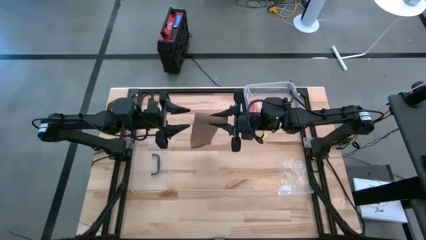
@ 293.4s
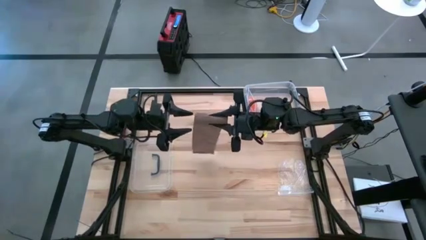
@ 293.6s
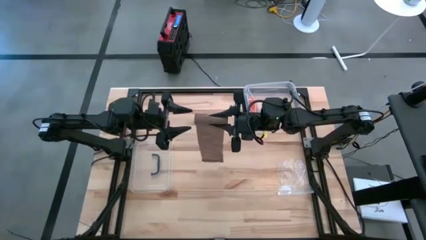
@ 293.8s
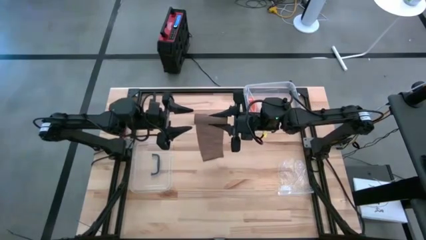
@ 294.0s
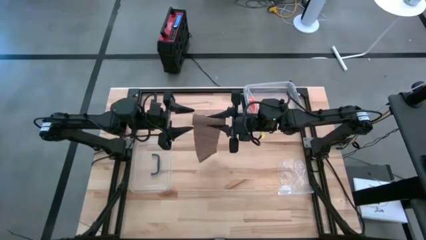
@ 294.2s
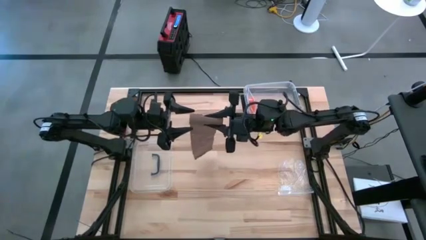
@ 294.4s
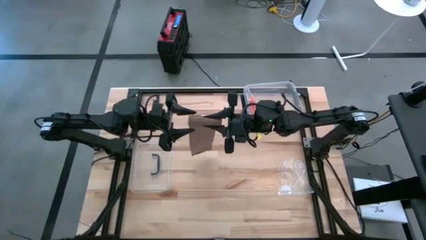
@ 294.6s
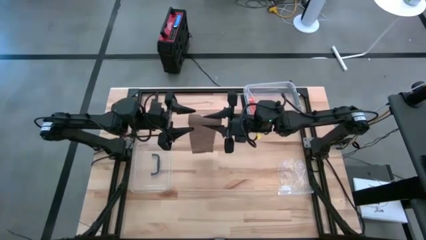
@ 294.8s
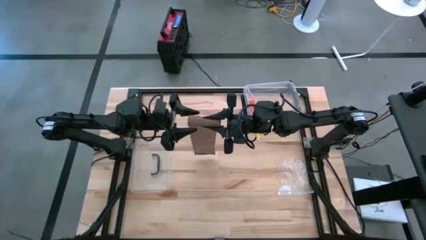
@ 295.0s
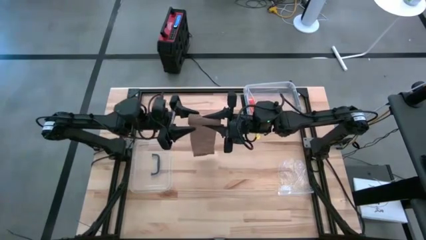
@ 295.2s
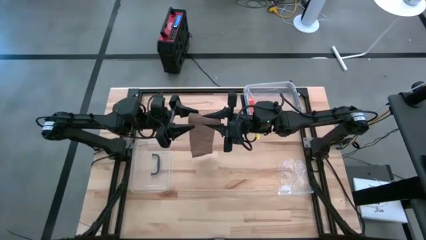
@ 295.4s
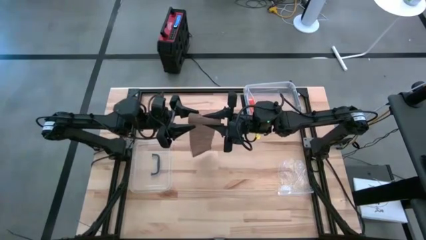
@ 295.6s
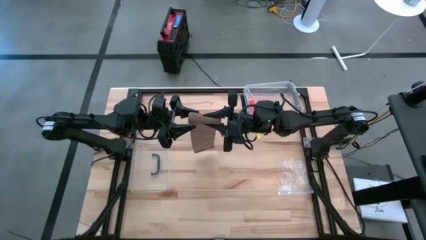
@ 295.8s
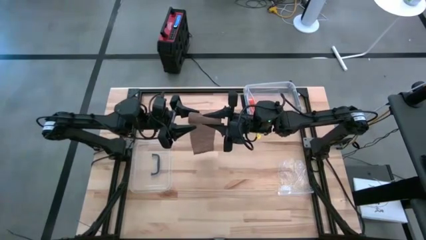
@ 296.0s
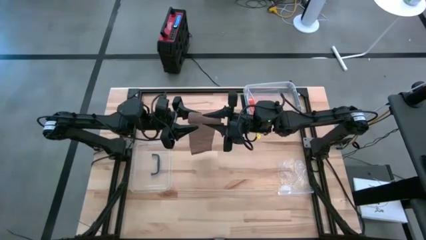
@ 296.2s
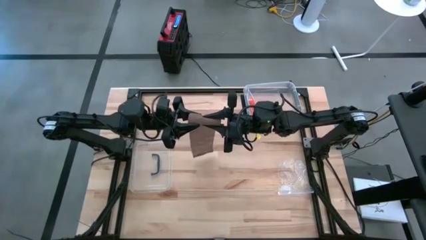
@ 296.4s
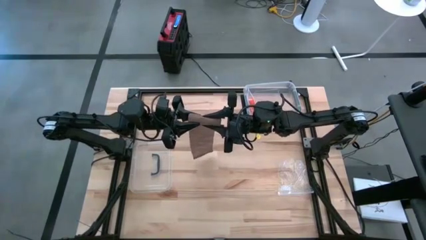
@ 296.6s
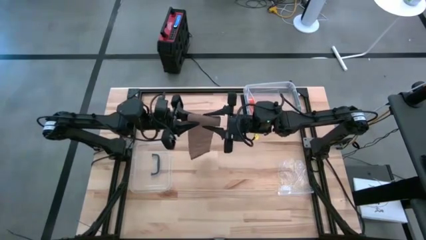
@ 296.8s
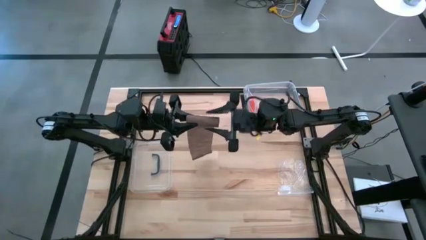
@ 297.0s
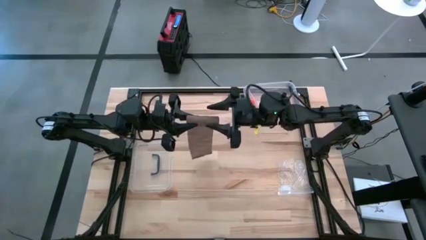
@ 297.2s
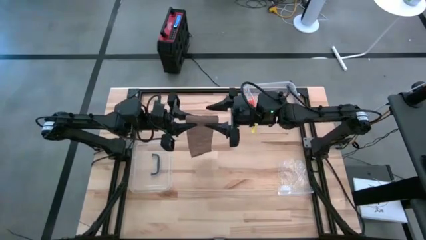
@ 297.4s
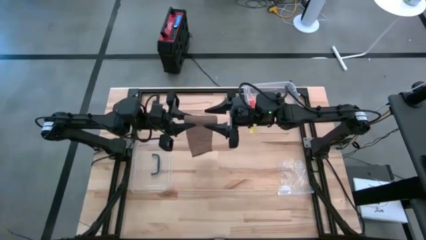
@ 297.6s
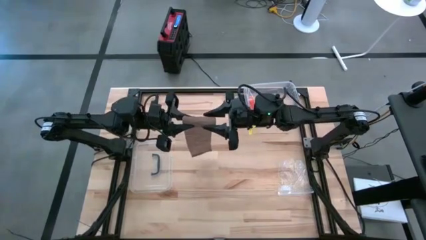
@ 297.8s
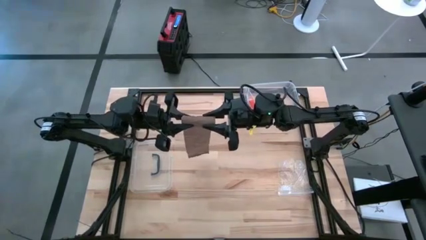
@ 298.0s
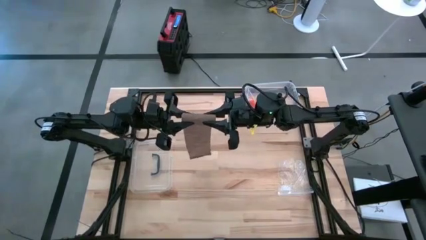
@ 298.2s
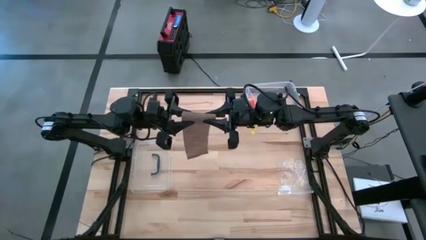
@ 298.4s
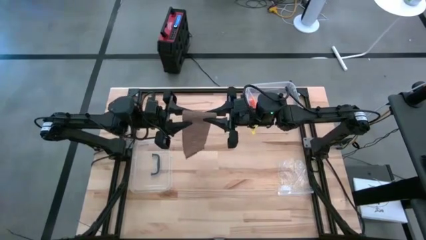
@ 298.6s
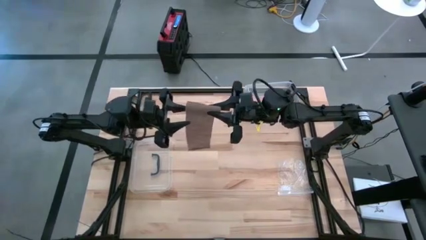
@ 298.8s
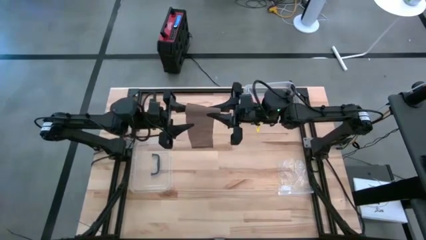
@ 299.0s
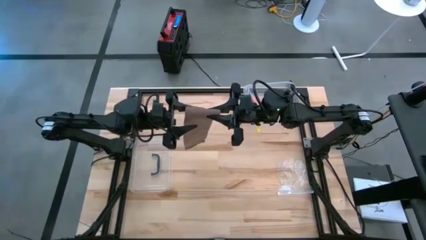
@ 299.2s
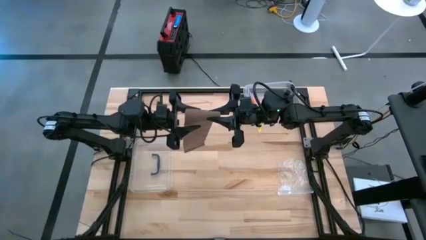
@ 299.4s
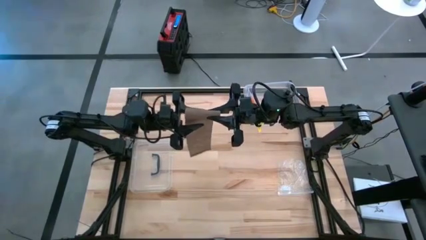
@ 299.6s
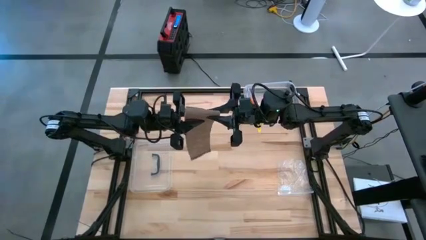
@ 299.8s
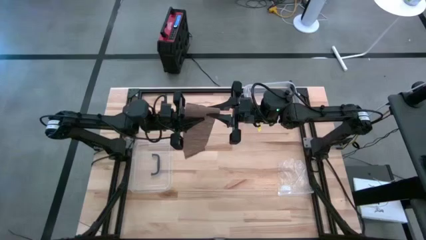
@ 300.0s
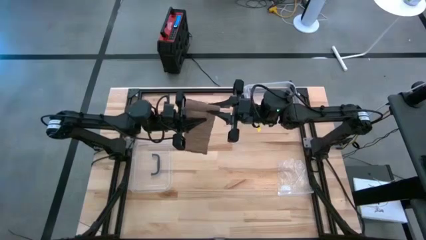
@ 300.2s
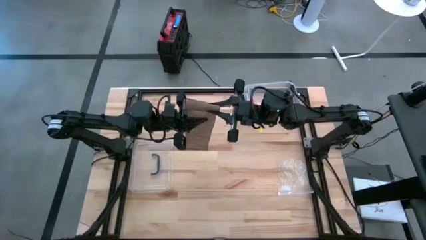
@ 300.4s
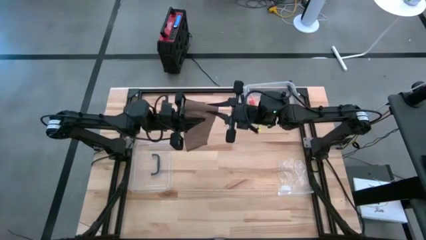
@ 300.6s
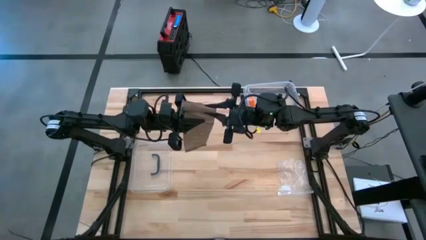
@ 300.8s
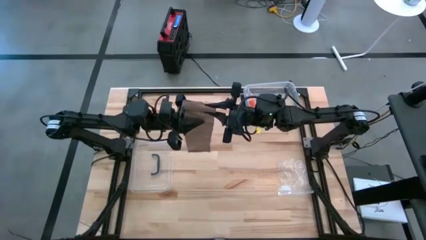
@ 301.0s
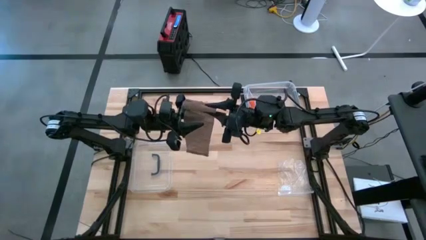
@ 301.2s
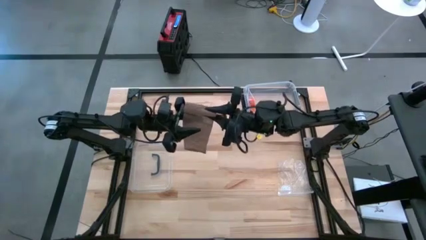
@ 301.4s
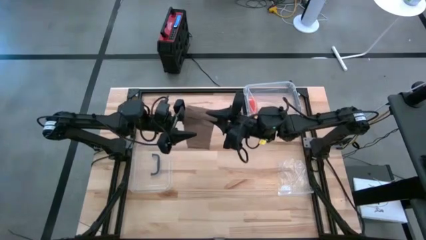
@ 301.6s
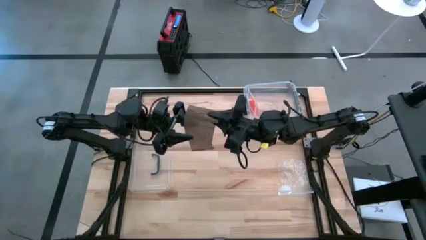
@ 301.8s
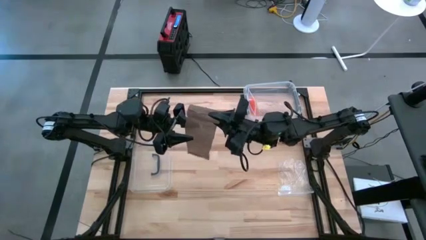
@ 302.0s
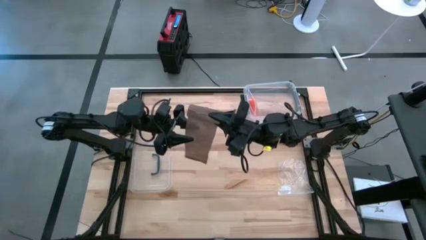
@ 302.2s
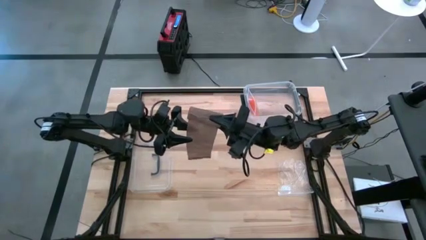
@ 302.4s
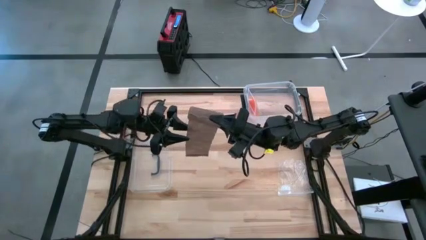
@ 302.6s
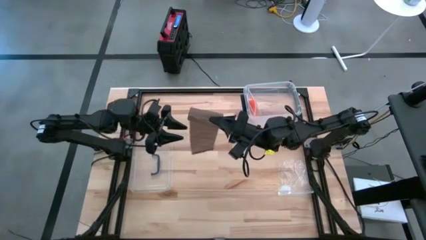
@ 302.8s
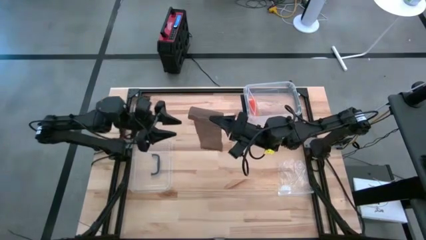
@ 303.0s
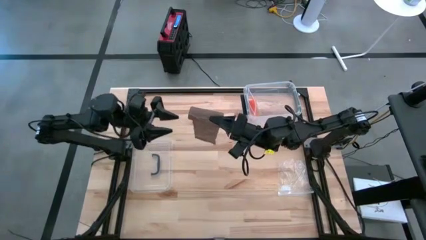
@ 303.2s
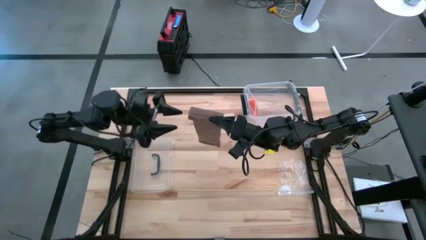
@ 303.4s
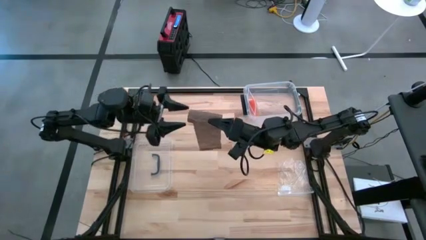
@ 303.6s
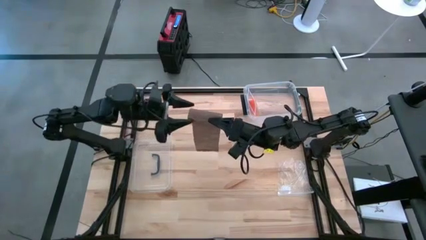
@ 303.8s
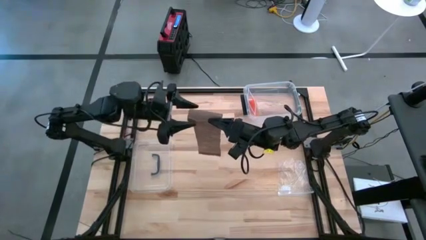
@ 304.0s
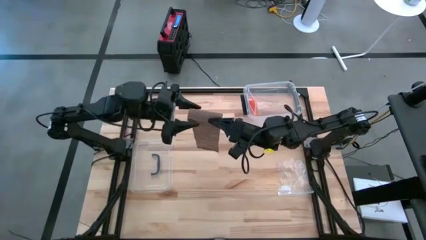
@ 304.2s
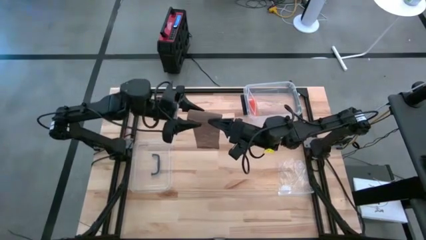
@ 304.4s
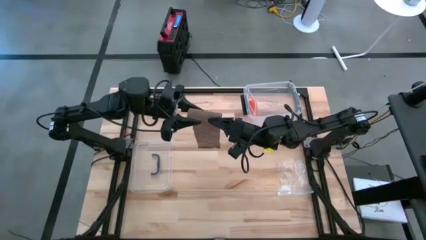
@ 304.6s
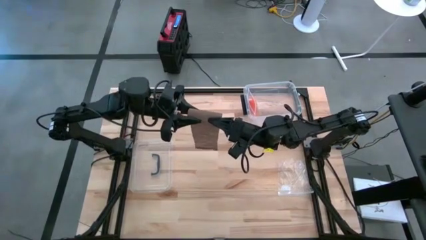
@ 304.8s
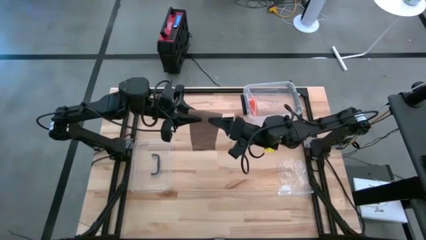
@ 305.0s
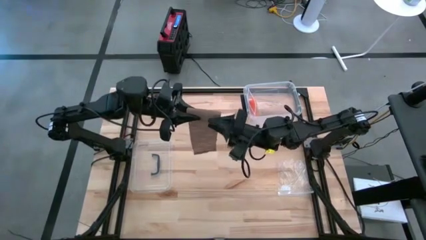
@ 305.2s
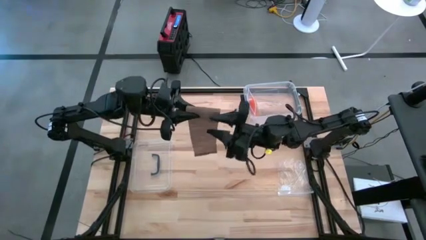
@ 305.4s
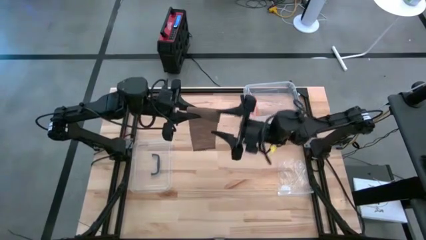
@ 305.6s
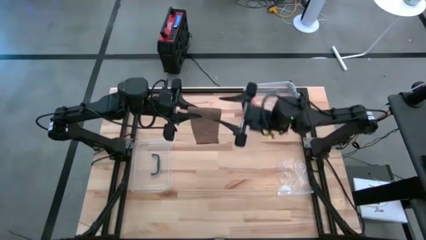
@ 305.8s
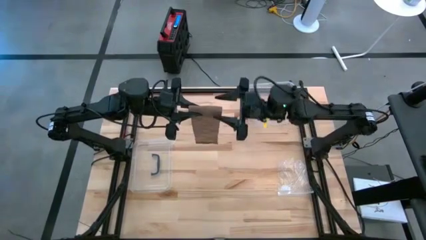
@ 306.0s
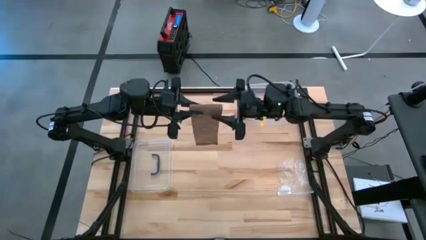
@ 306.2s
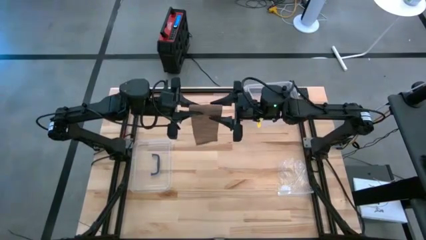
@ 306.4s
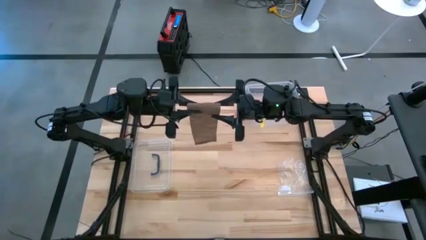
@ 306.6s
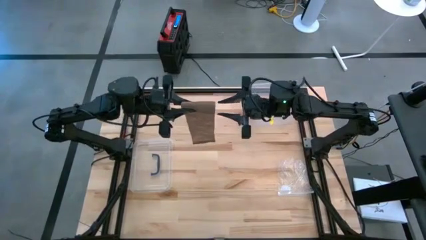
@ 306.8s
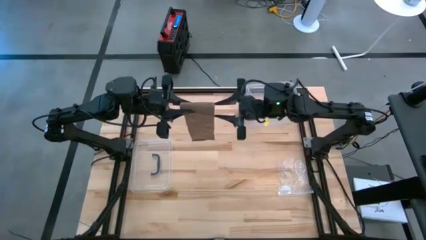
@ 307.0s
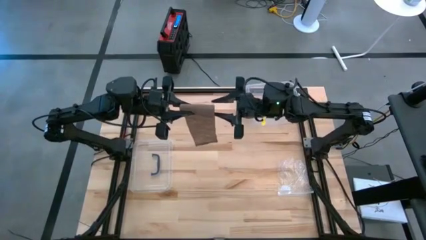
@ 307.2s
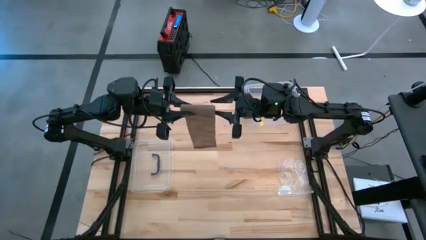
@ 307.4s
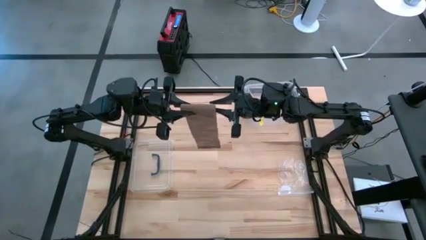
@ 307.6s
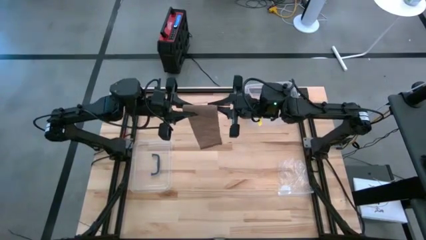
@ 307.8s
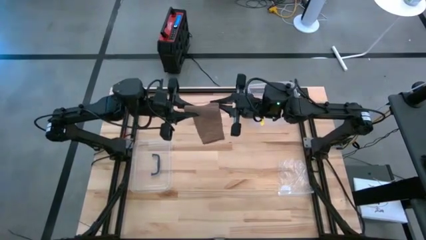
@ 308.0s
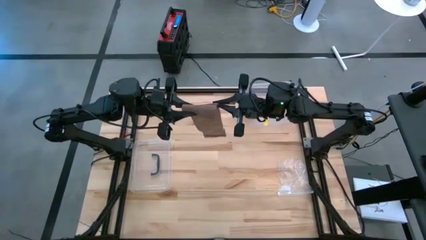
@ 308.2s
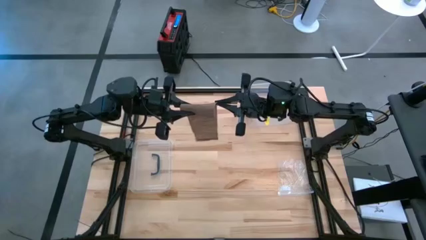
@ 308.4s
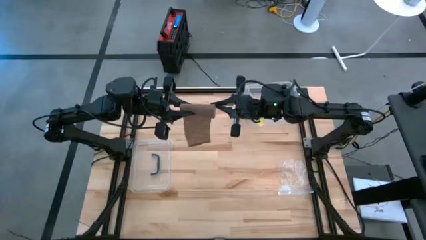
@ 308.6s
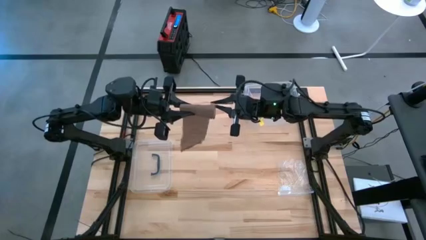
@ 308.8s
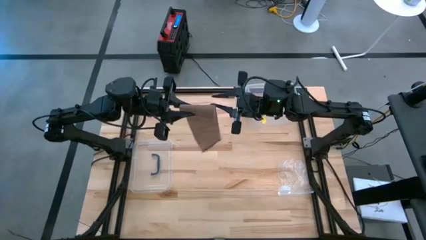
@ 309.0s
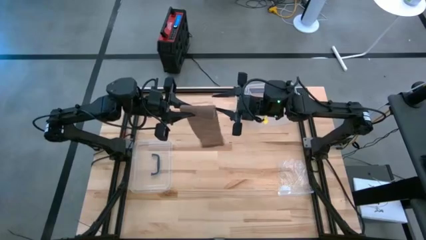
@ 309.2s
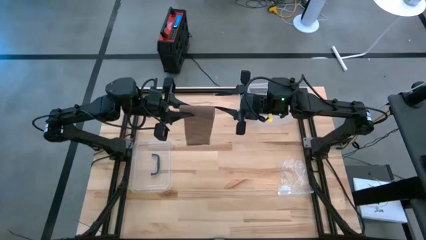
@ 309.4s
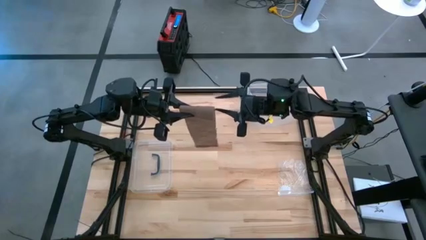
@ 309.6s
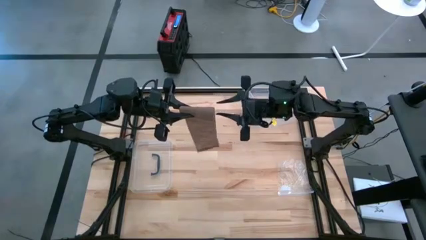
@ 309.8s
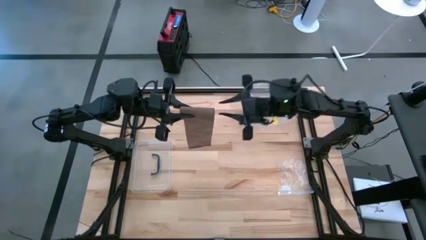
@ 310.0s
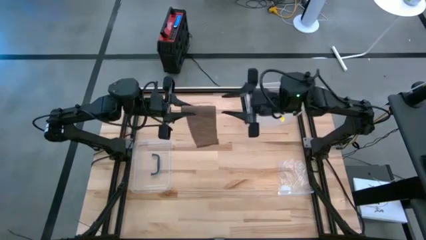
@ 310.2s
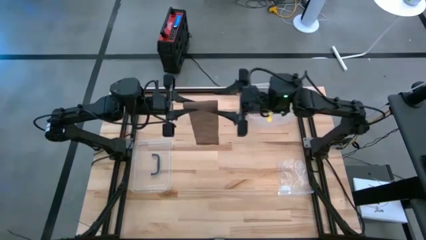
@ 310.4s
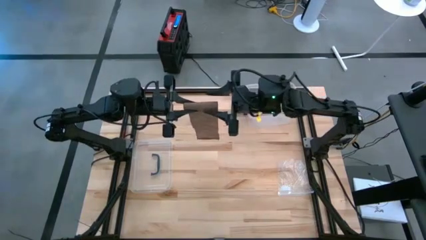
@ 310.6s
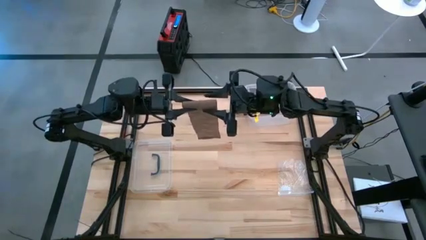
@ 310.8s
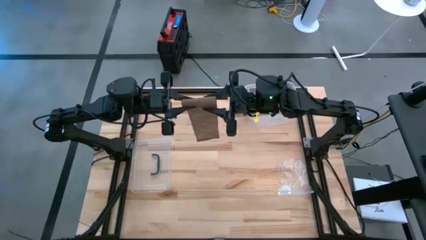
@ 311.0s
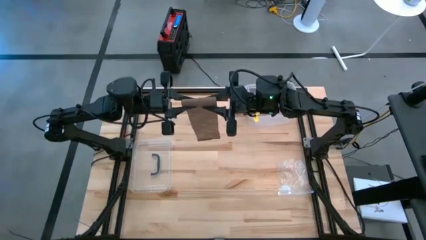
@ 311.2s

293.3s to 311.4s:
Task: Roll bandage
Roll the brown bandage
